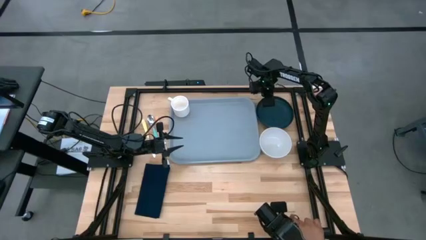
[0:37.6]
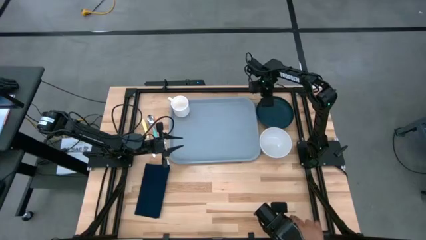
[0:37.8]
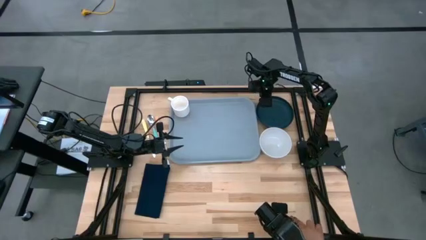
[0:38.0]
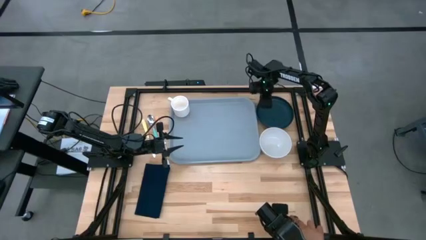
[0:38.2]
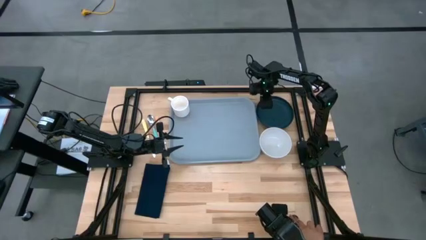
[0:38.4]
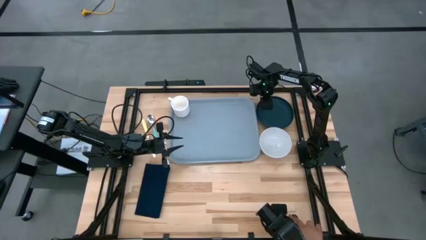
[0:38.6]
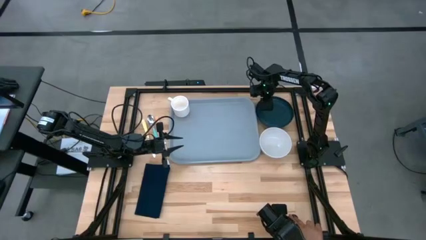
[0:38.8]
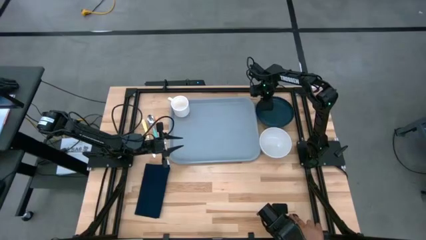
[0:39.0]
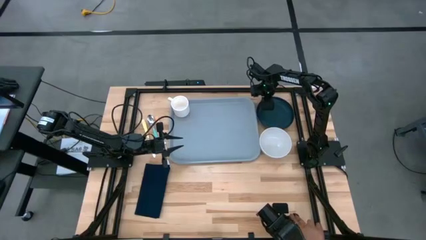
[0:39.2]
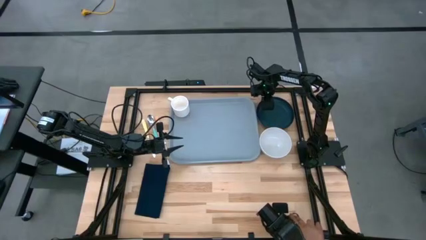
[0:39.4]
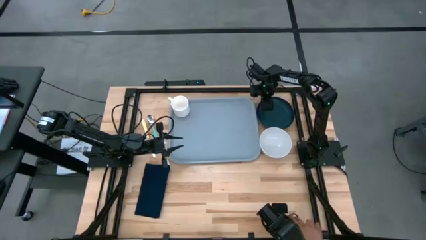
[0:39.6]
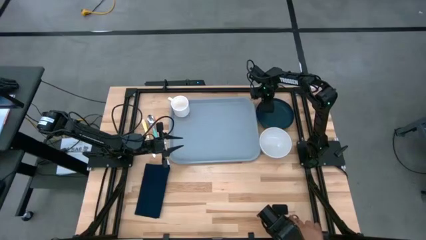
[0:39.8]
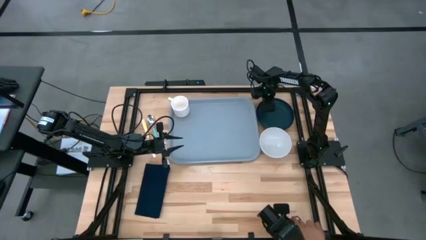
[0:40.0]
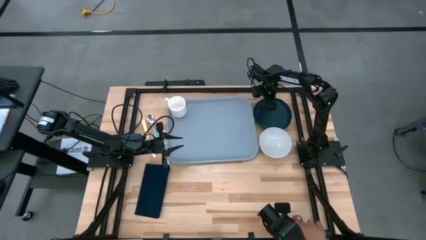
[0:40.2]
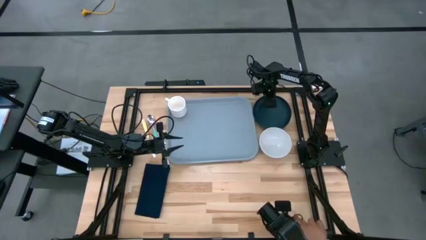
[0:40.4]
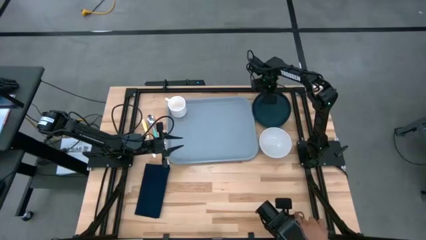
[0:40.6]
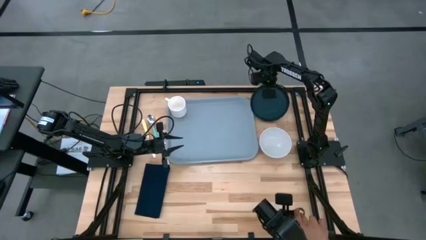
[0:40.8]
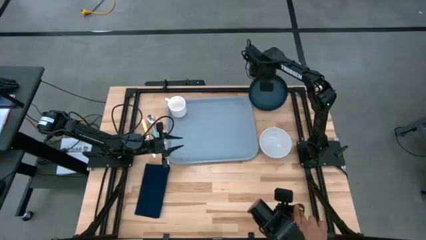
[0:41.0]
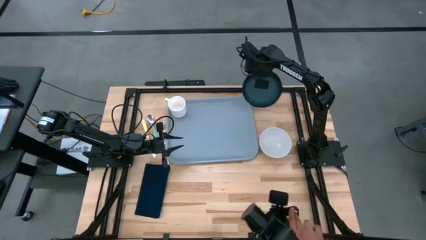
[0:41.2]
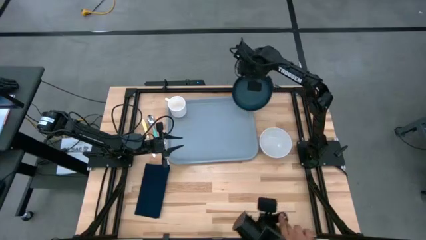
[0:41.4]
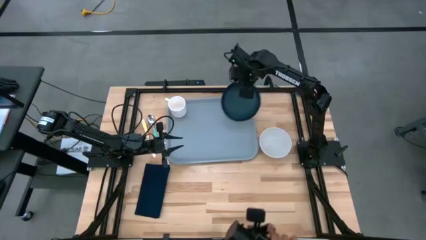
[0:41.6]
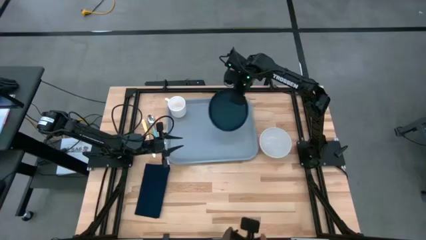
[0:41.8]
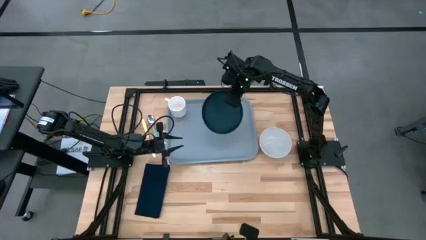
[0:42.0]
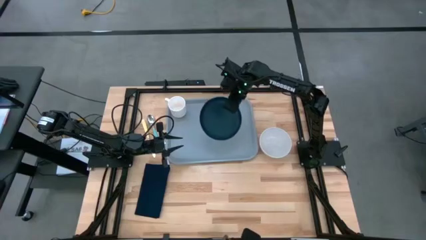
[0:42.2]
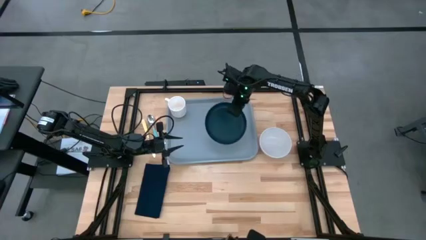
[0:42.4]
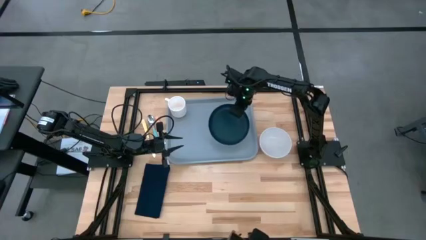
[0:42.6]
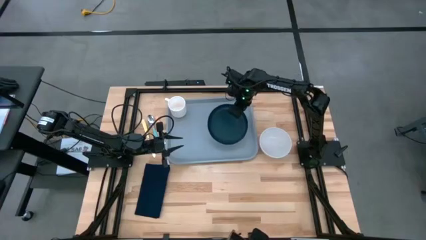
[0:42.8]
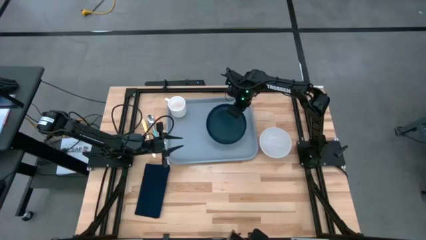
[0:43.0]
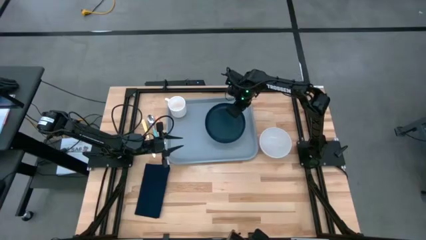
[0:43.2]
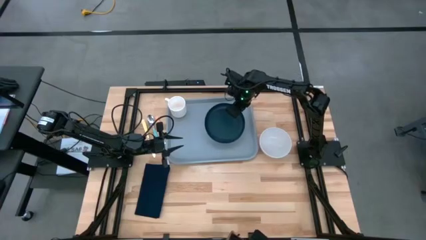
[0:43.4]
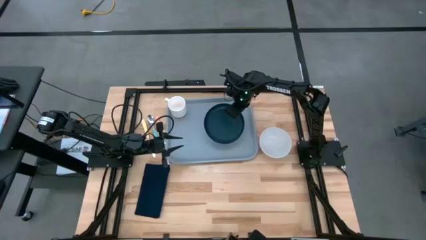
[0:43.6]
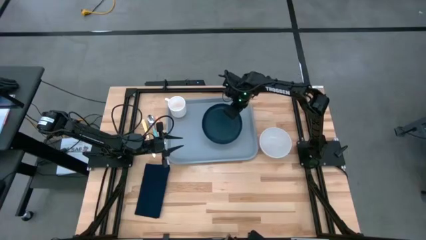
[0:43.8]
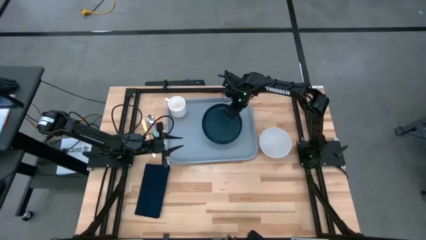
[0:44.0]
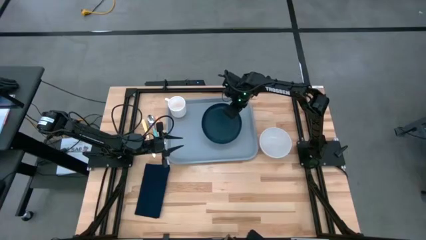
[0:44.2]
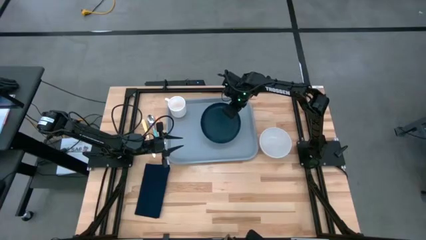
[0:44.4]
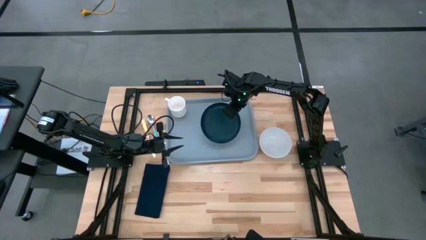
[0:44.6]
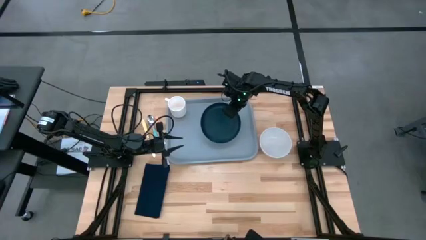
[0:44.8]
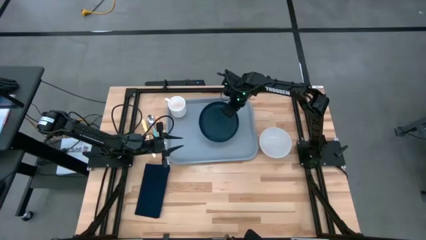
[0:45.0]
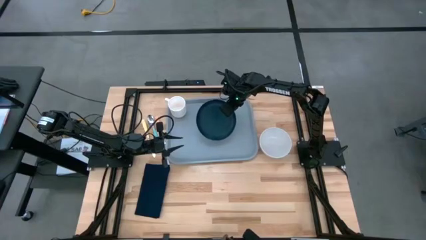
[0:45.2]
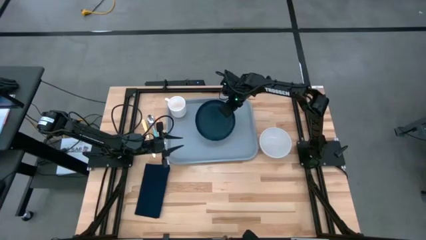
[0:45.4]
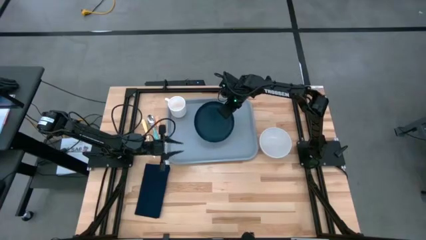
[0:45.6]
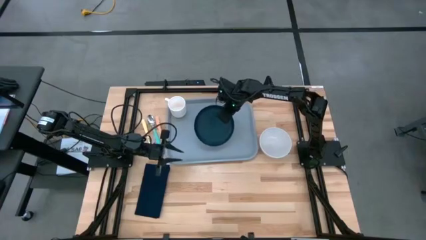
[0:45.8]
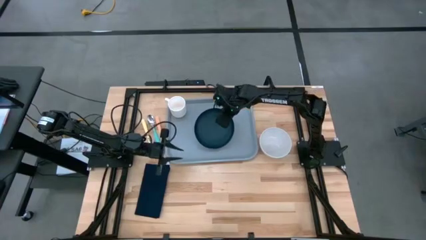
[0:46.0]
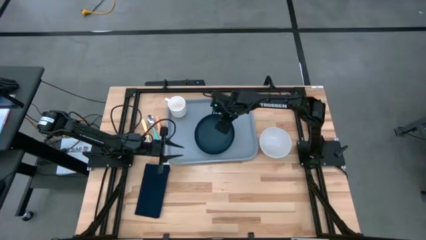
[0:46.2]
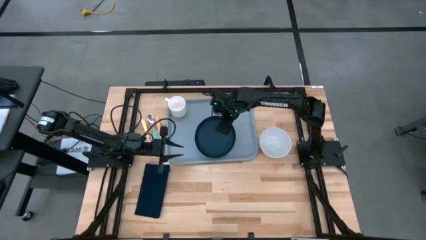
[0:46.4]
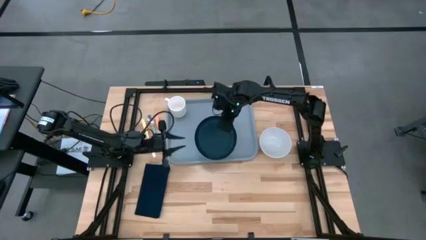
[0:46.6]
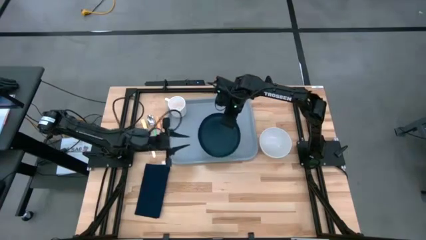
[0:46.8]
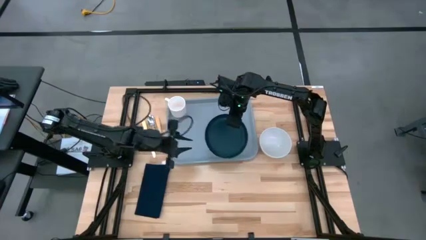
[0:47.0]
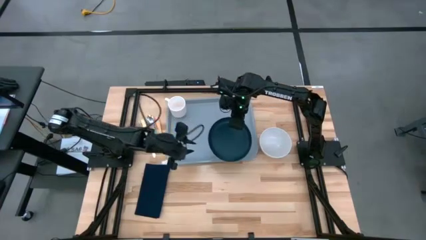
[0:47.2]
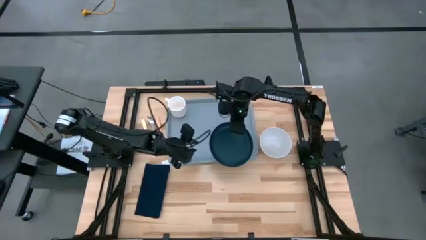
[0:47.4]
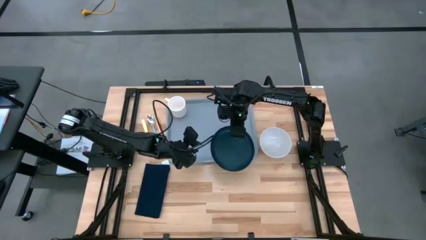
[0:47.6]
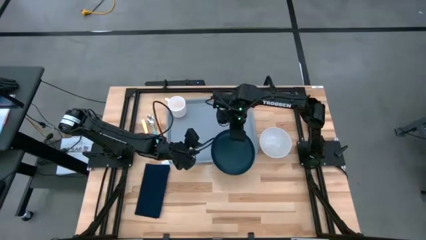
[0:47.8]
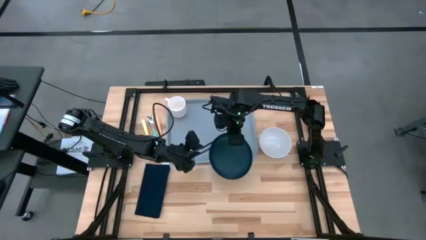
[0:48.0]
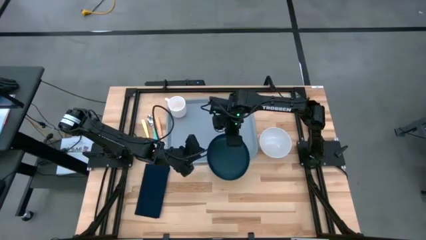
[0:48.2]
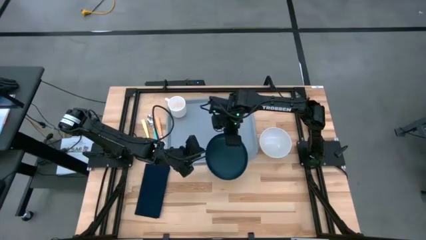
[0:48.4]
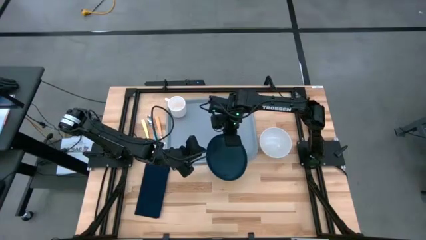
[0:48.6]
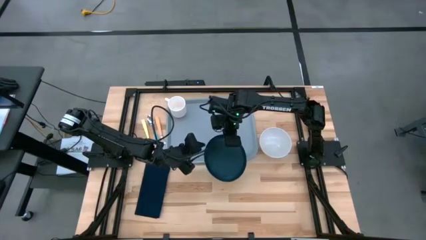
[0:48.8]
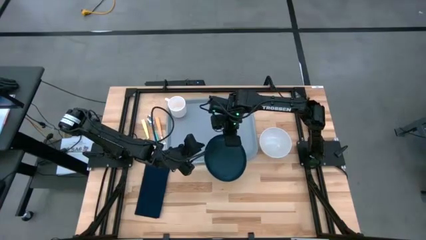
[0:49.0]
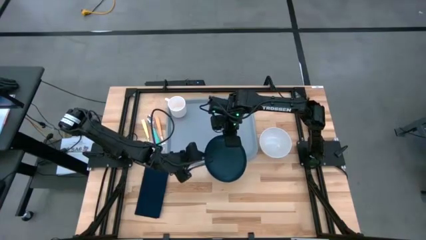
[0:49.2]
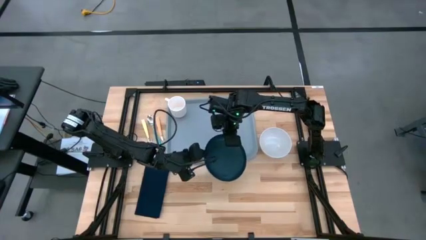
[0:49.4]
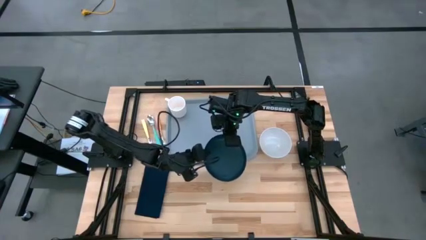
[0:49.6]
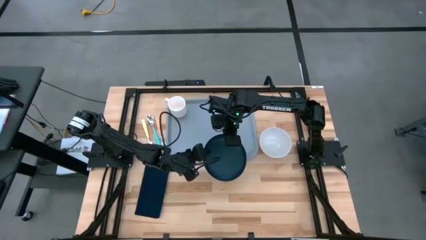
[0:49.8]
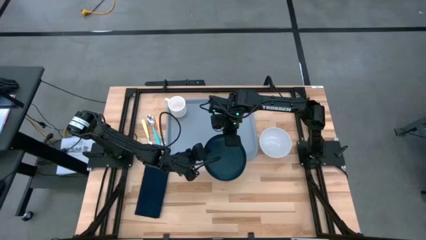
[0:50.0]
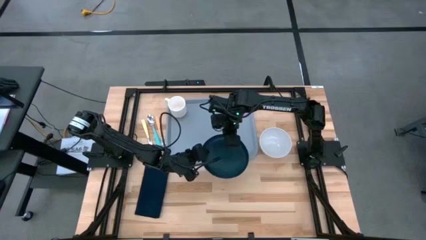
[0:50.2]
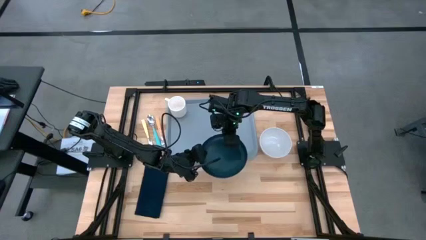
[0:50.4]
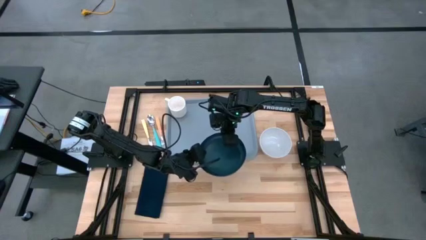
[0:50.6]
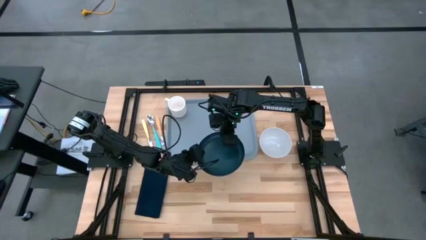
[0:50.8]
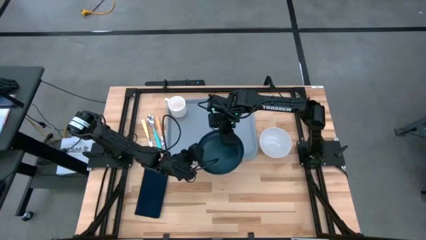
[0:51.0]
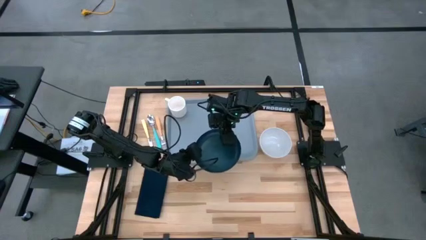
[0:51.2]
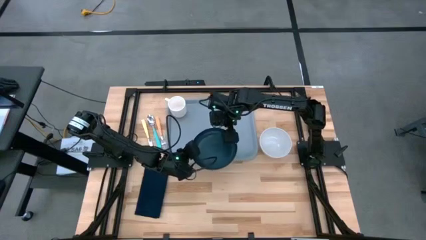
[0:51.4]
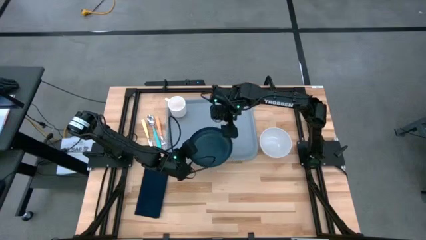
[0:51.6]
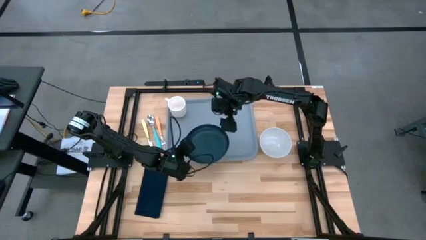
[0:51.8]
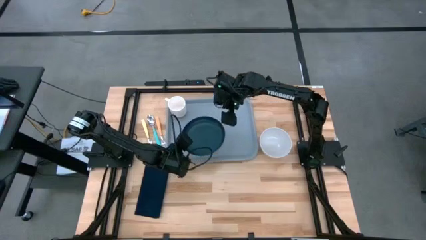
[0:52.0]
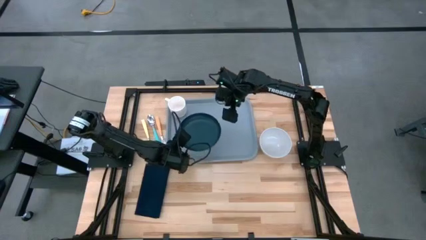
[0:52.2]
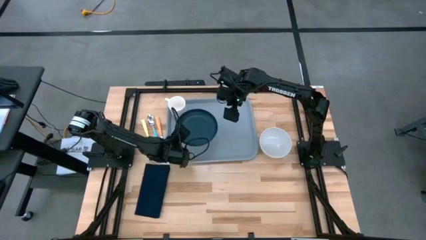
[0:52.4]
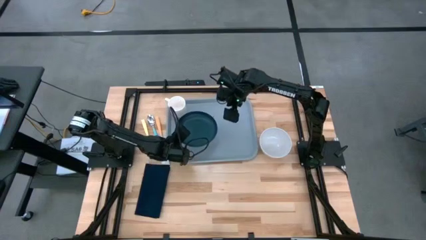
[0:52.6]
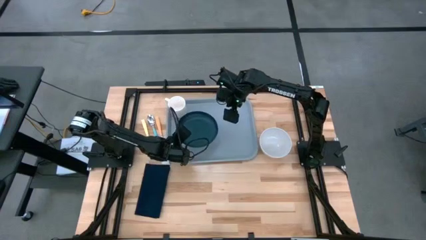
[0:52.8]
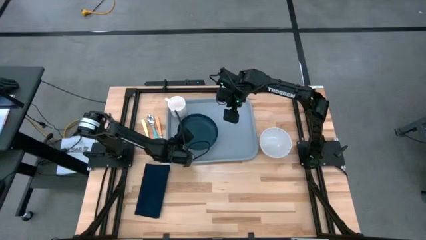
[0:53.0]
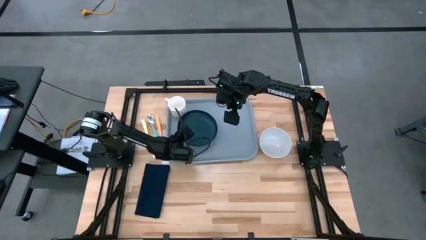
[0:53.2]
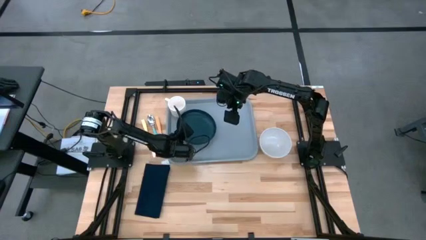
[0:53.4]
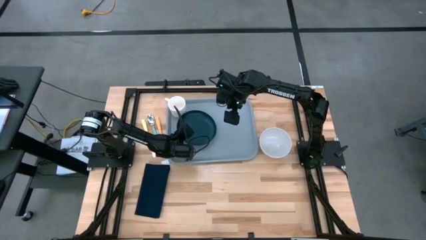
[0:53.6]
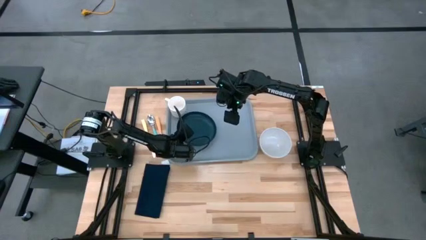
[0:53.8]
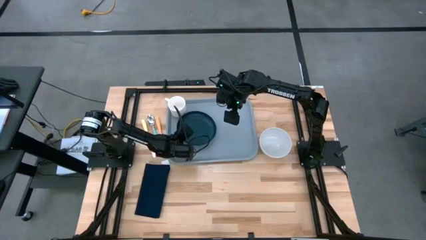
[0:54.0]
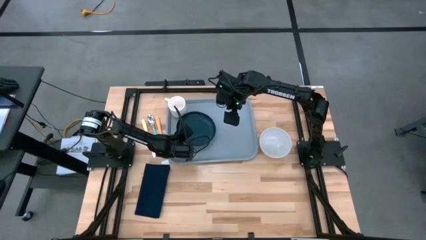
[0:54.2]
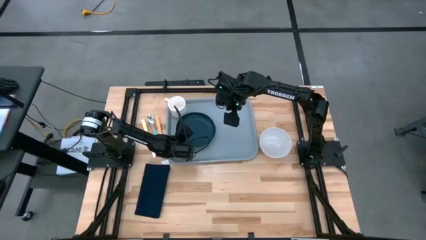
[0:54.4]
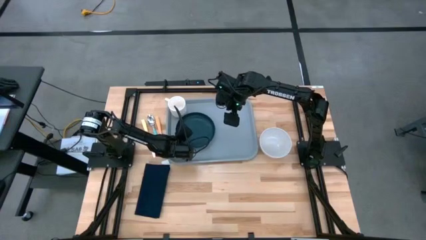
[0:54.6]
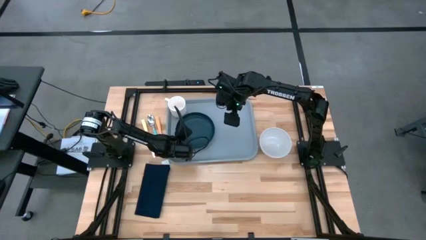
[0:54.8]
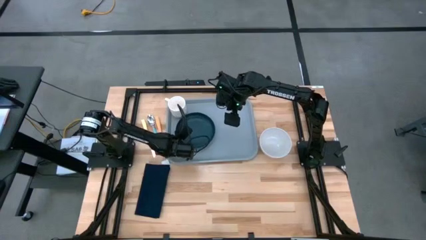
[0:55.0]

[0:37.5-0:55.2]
Task: Set up tray
Put the black plate on the gray tray to the bottom right of the white mug
